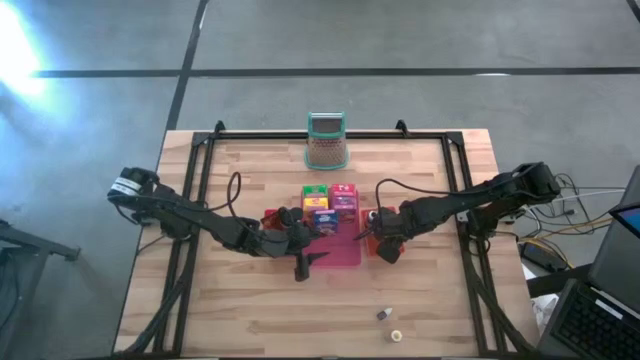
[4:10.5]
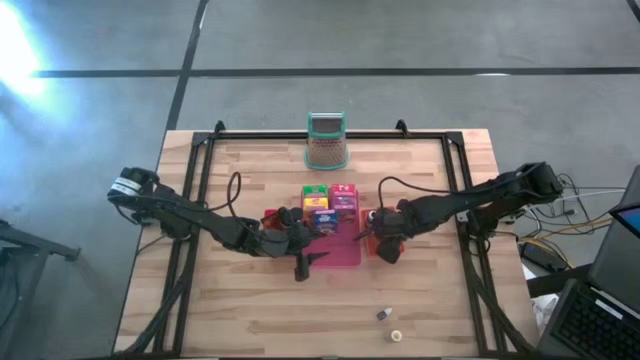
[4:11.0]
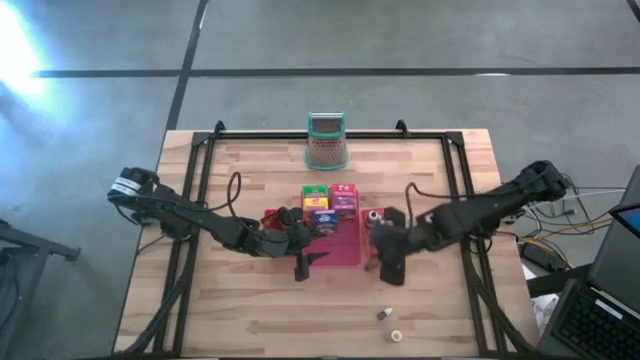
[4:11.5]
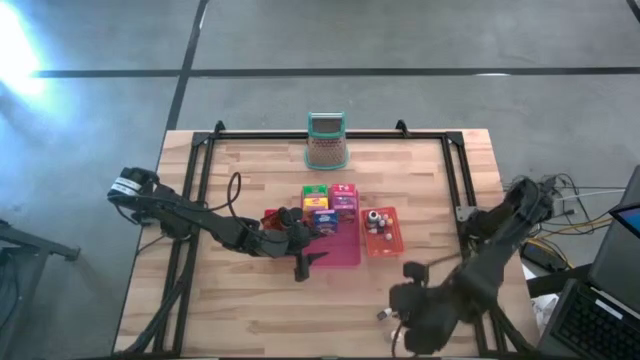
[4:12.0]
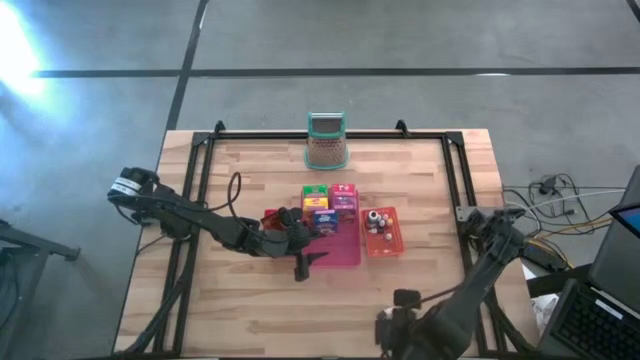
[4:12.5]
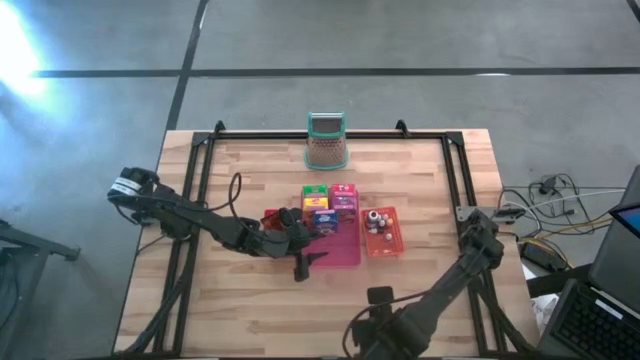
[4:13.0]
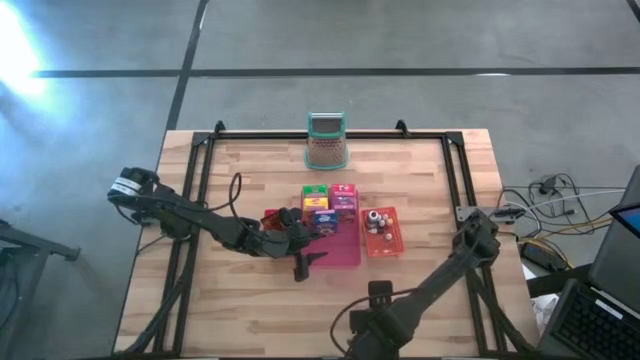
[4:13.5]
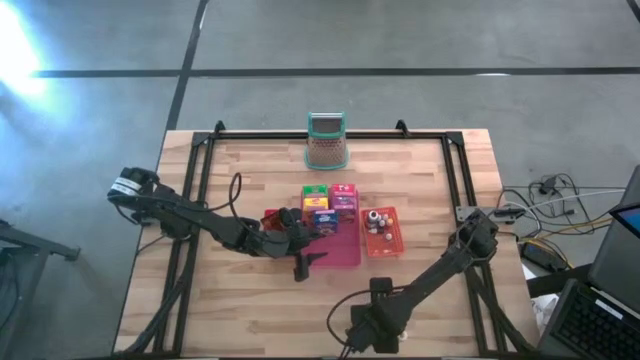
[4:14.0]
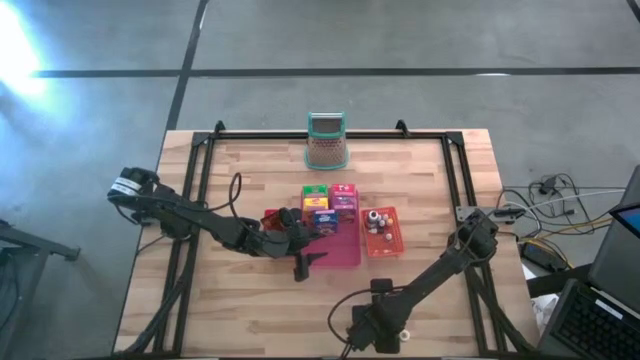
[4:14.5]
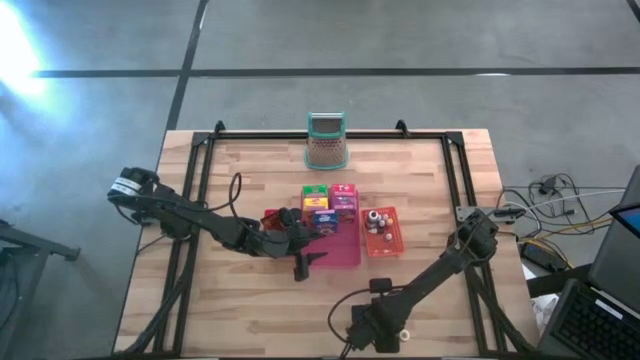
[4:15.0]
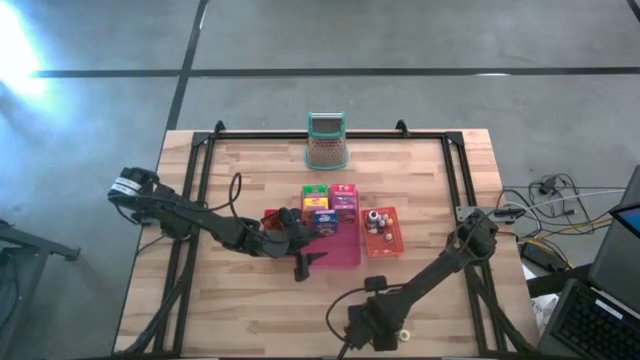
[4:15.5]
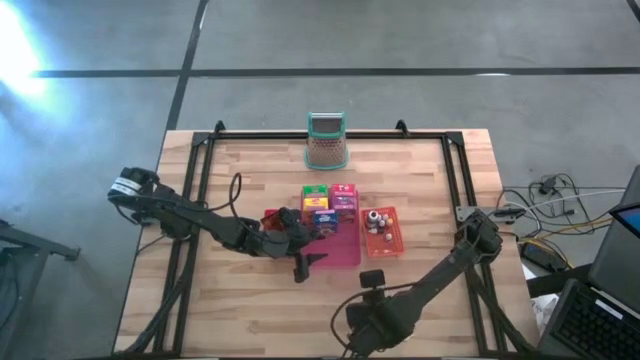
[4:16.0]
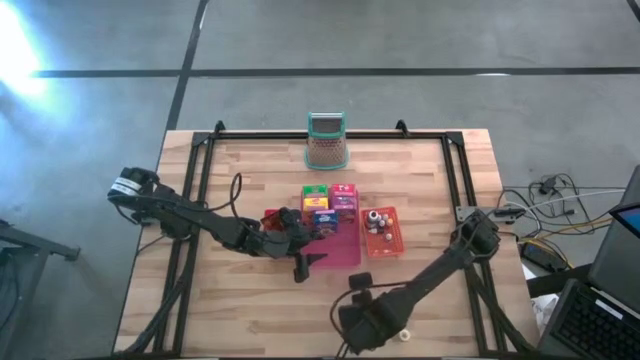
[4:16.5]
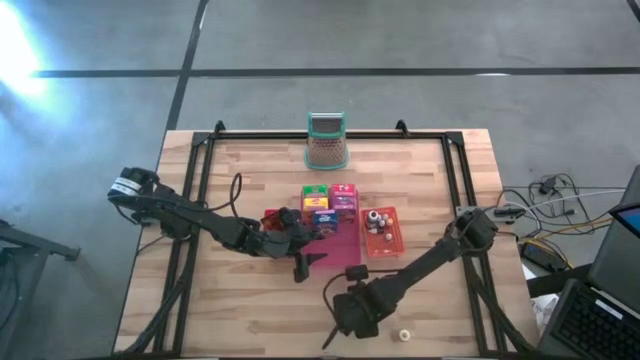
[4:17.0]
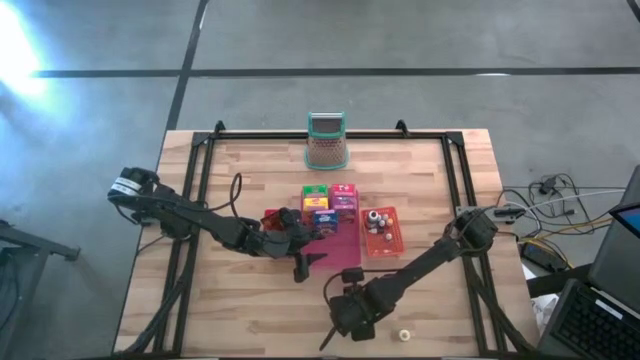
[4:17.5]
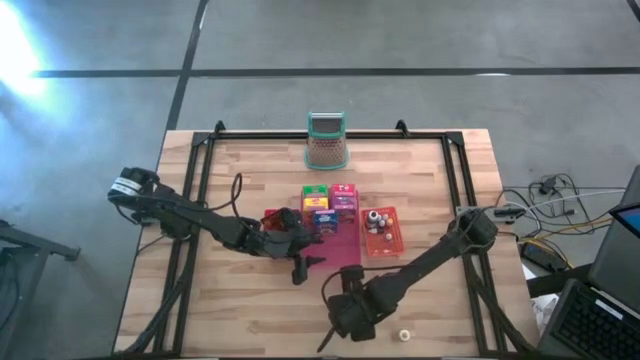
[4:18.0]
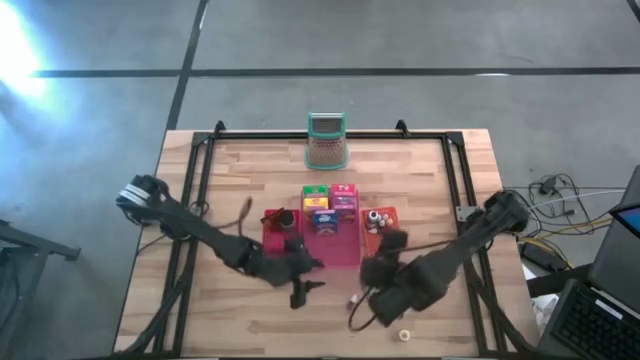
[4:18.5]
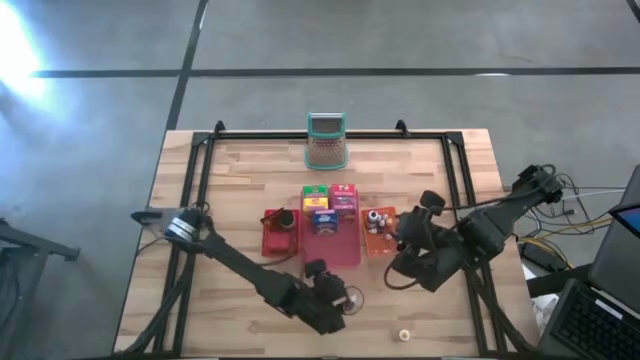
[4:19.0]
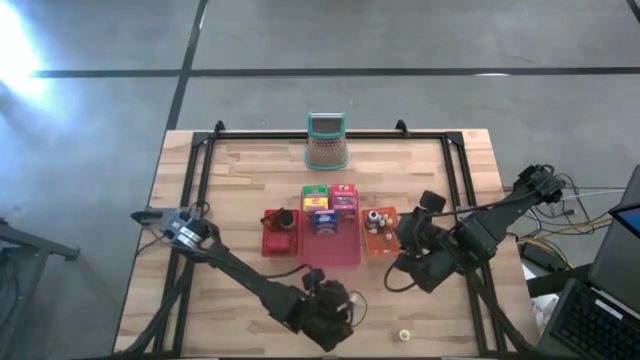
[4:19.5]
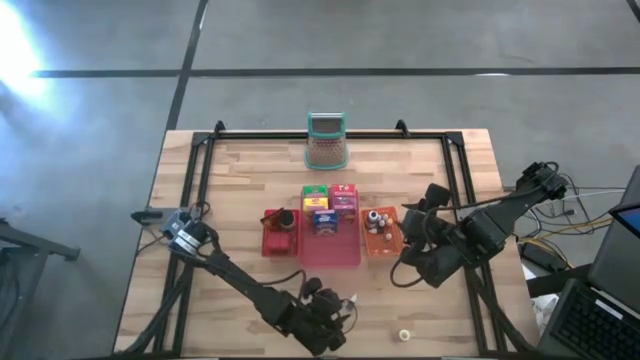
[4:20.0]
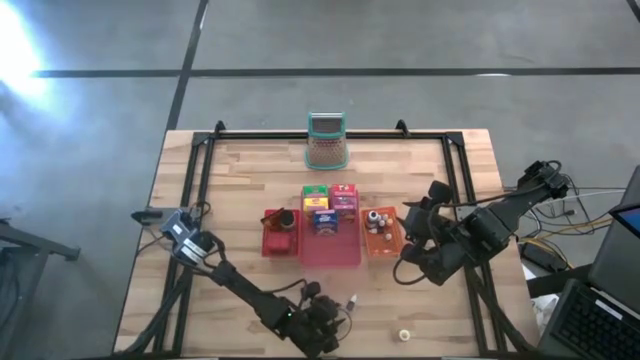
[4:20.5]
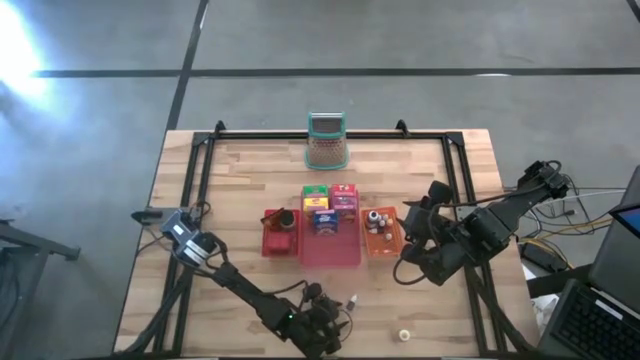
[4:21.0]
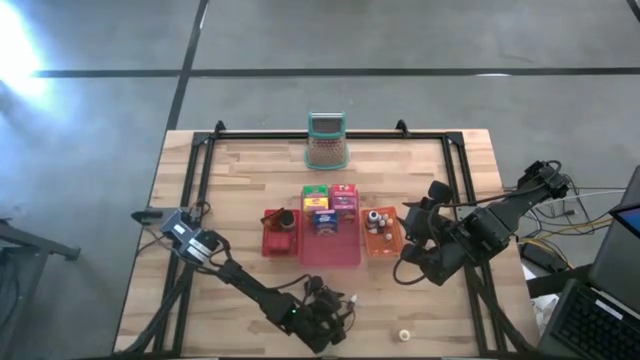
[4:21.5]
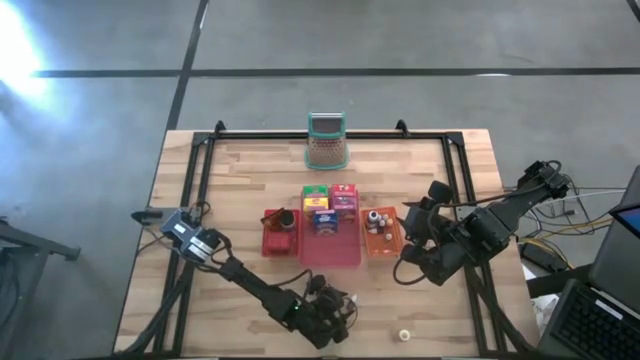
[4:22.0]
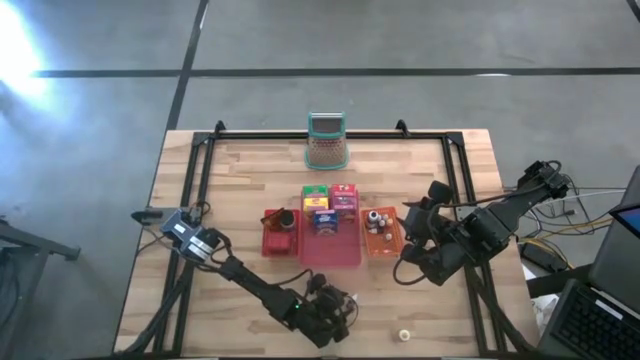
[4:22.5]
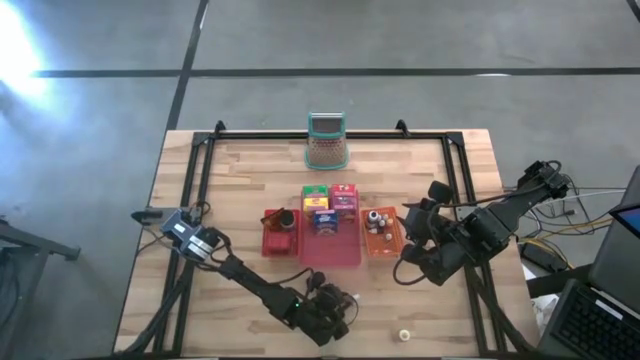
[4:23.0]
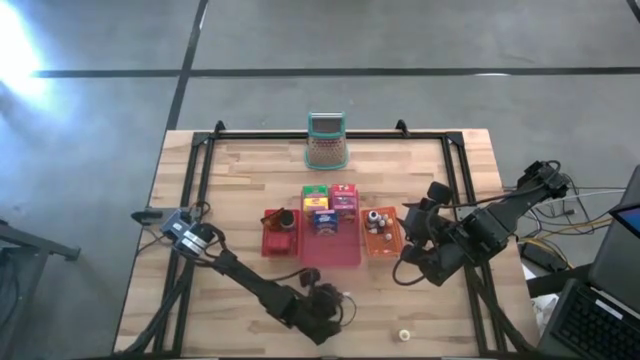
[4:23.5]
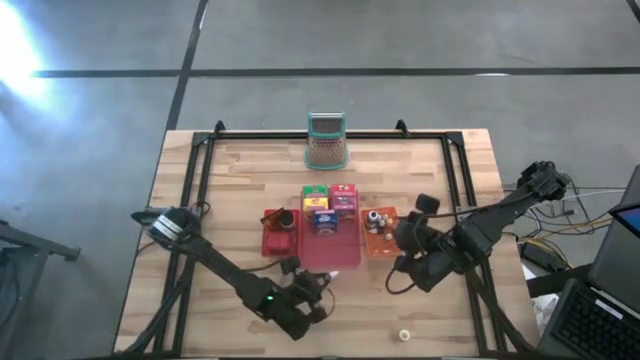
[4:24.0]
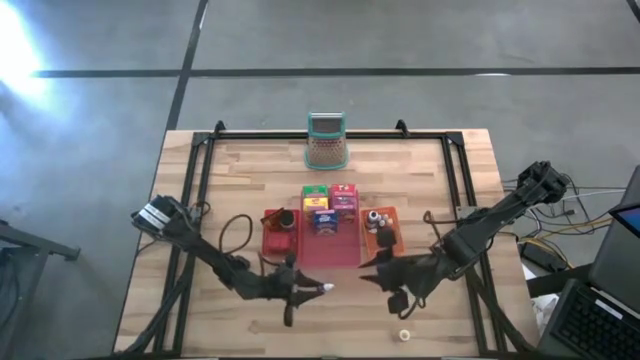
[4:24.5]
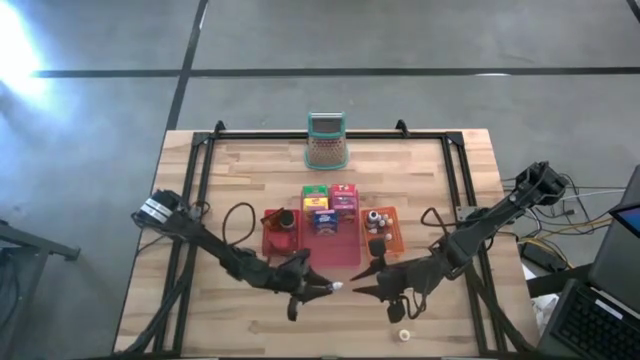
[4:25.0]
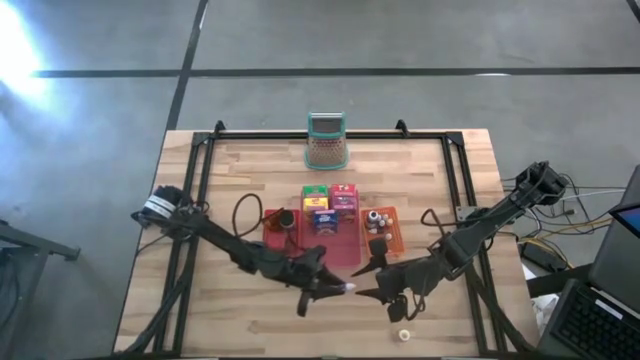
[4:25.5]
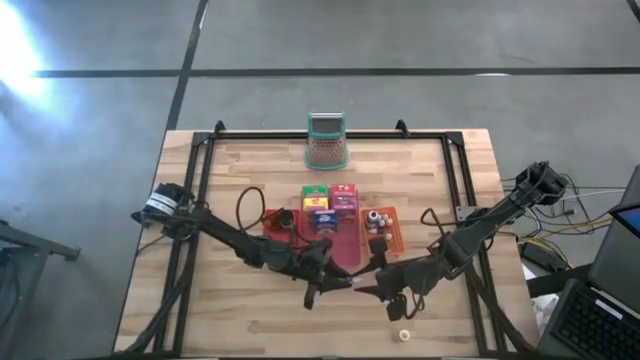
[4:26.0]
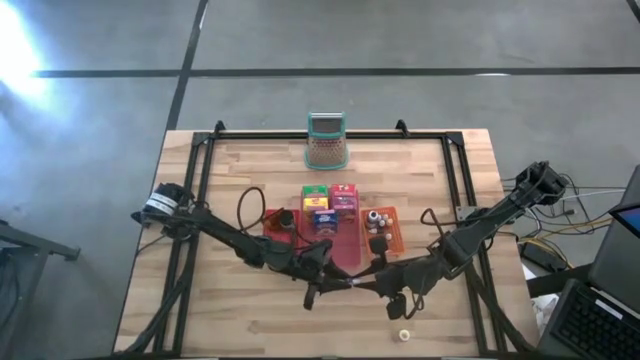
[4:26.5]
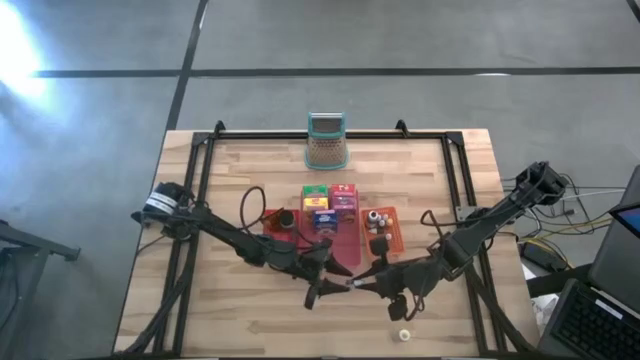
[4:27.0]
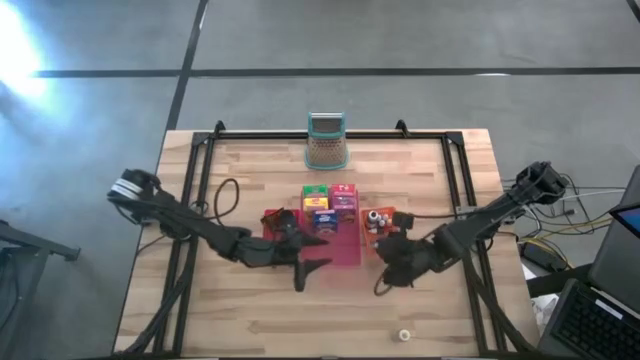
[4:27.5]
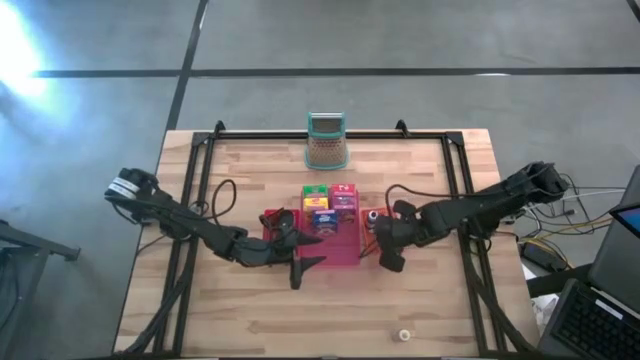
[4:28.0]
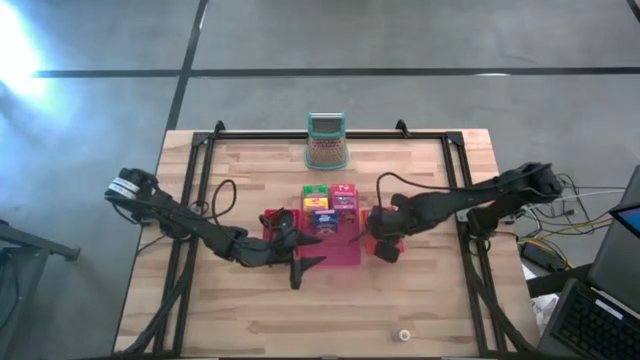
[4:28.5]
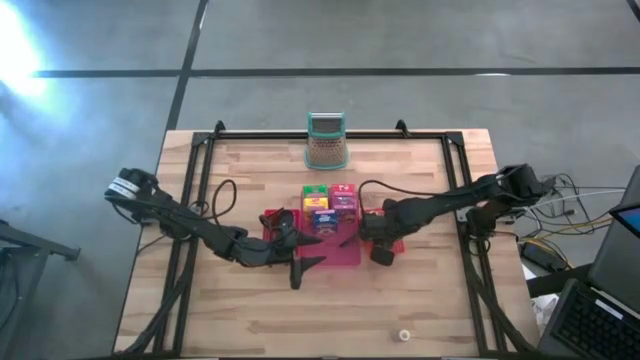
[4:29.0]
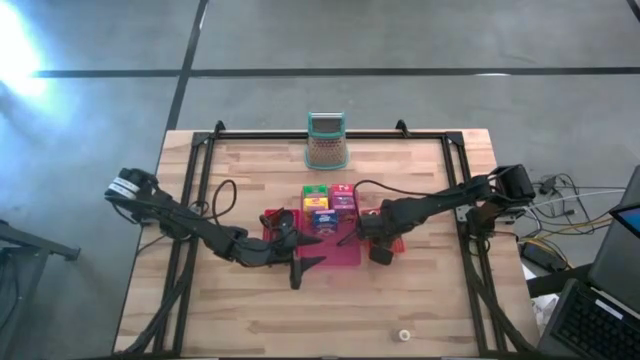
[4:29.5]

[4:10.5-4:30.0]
Task: Pick & Place Kitchen Items
Put the small purple food coloring bottle into the orange bin

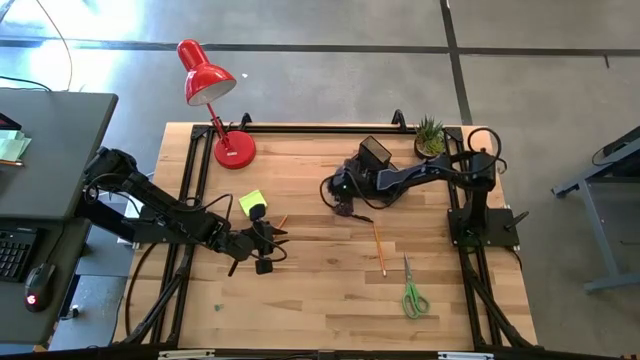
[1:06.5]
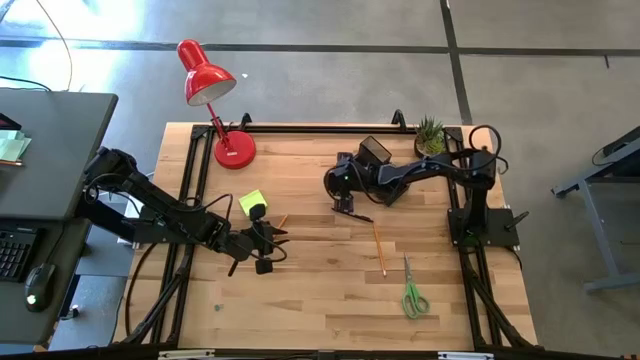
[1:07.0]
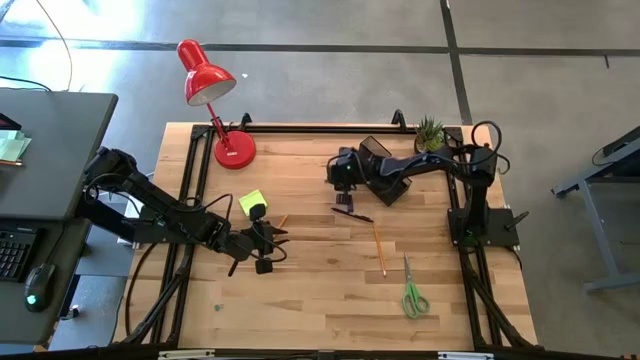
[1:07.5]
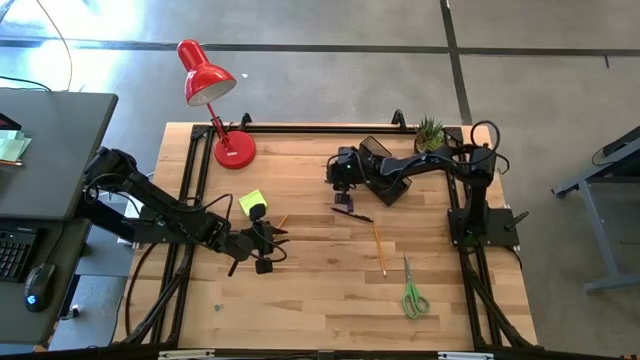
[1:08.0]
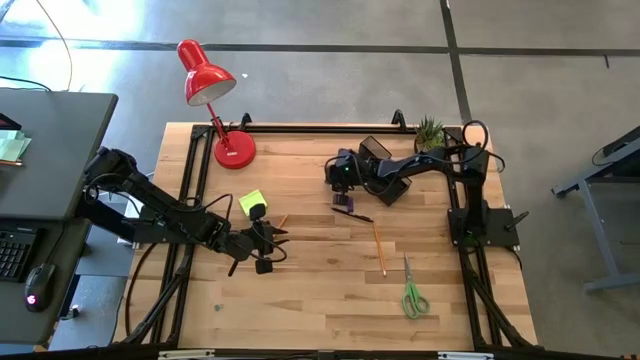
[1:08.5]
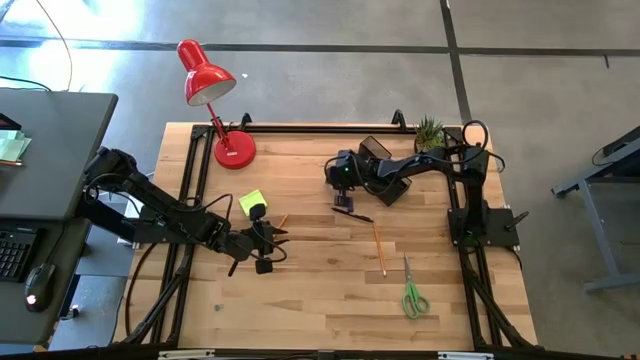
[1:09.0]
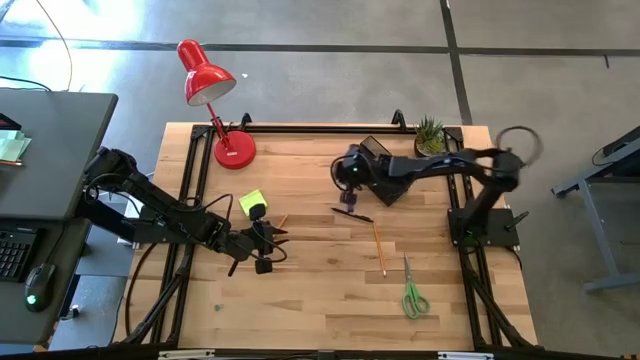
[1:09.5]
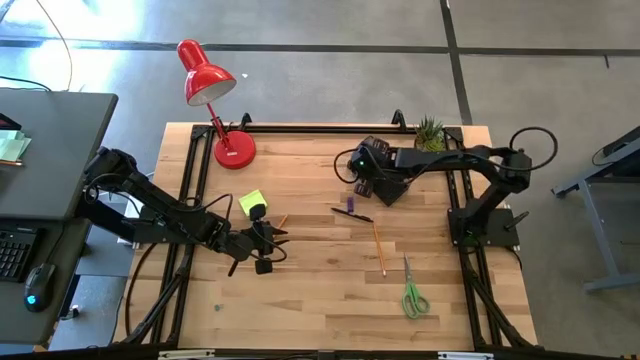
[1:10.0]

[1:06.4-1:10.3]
Task: Pick and place office supplies into organizer
Put the right blue binder clip into the black desk organizer
